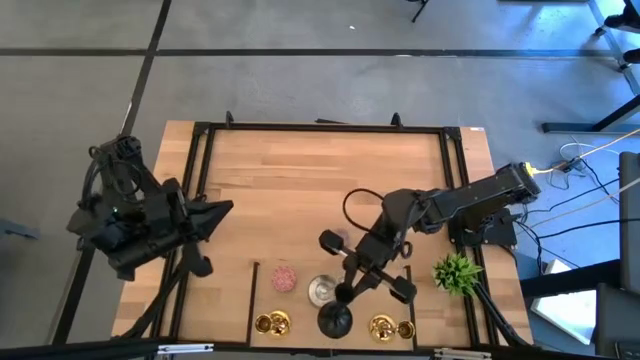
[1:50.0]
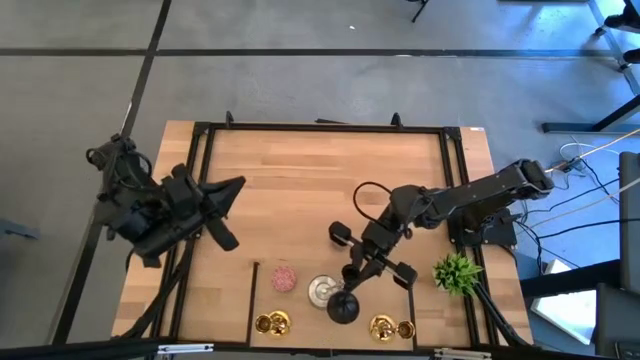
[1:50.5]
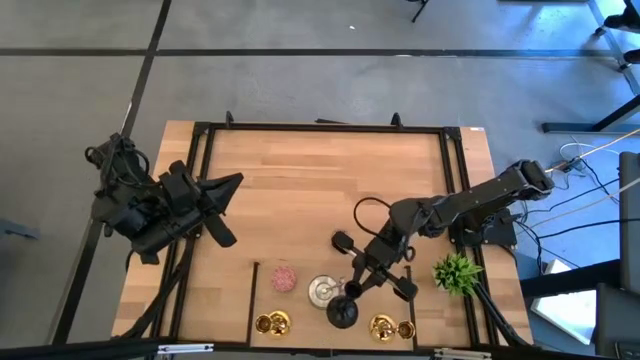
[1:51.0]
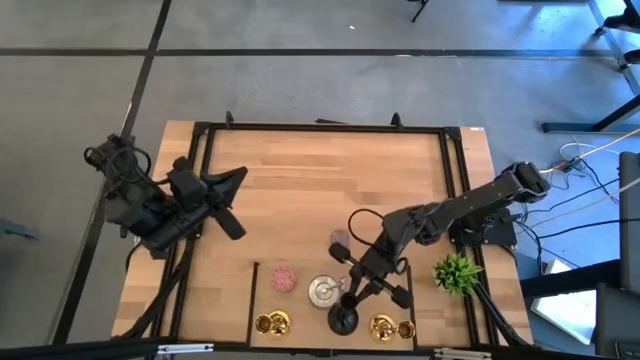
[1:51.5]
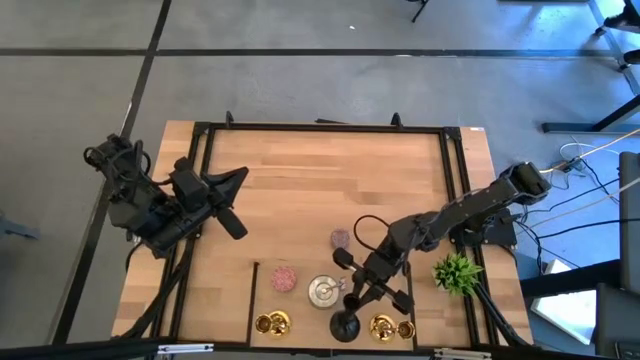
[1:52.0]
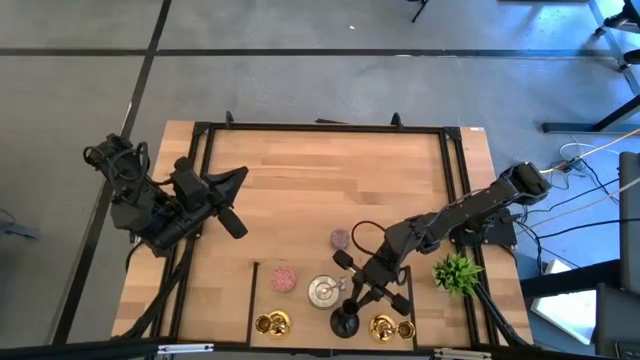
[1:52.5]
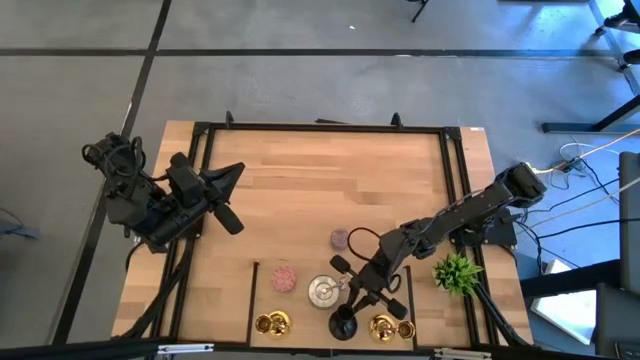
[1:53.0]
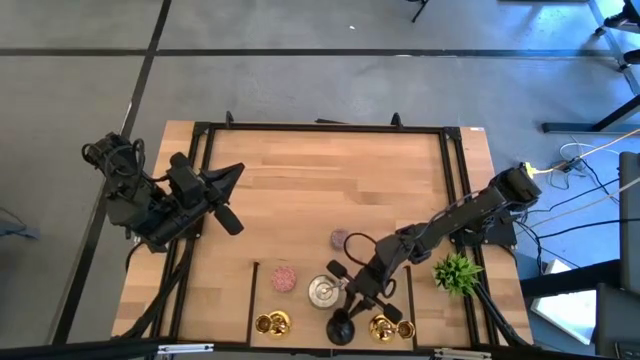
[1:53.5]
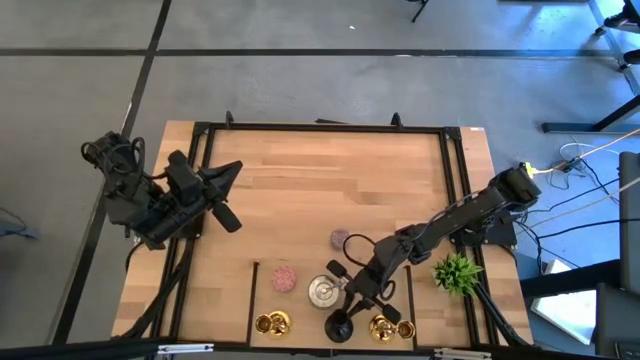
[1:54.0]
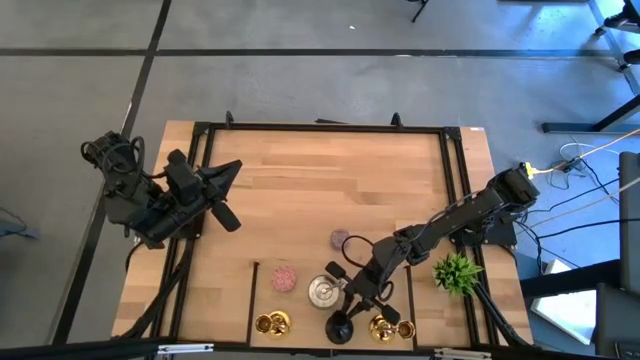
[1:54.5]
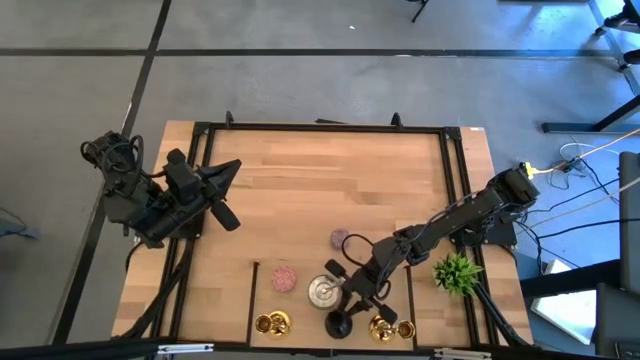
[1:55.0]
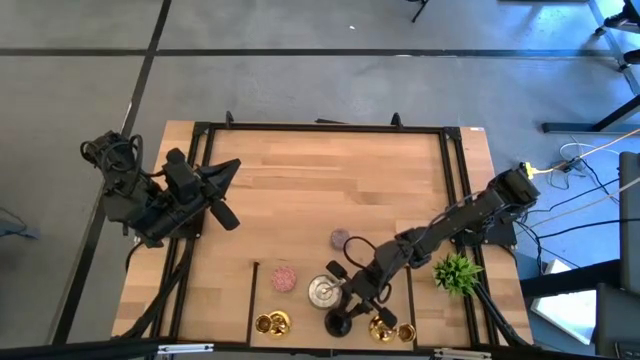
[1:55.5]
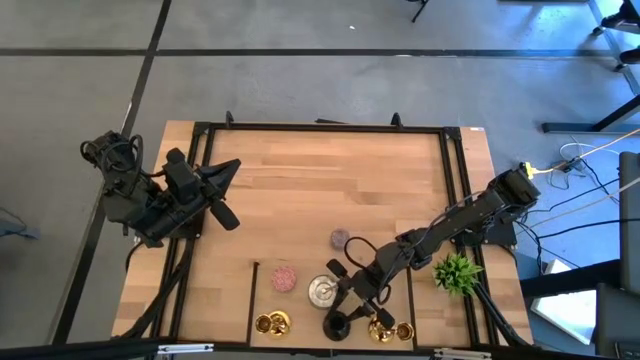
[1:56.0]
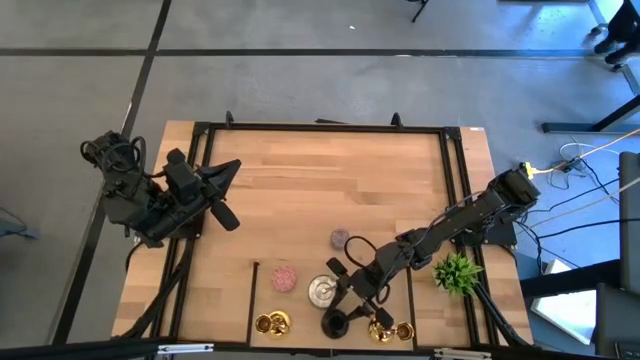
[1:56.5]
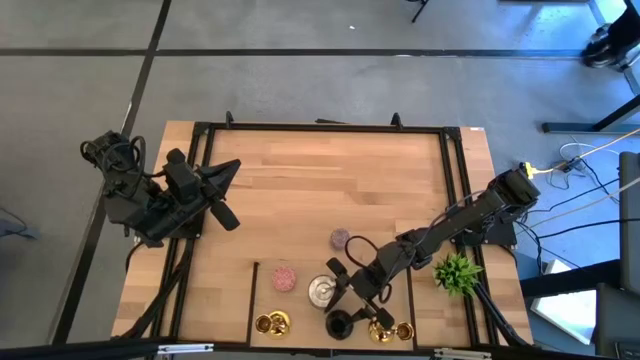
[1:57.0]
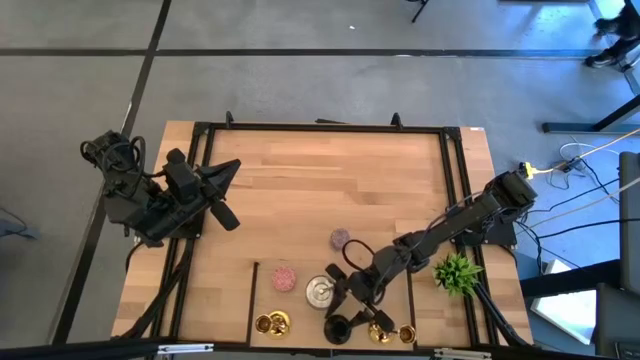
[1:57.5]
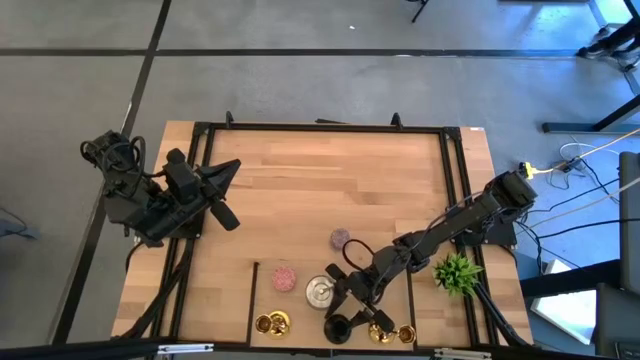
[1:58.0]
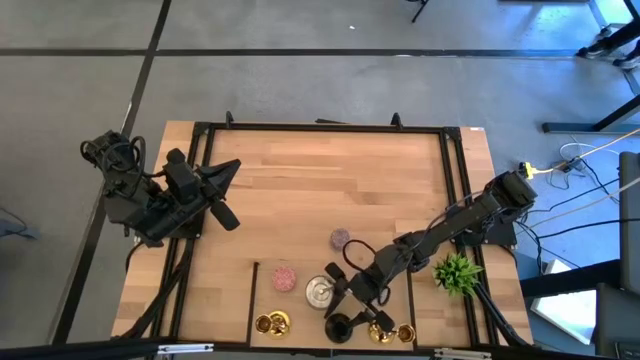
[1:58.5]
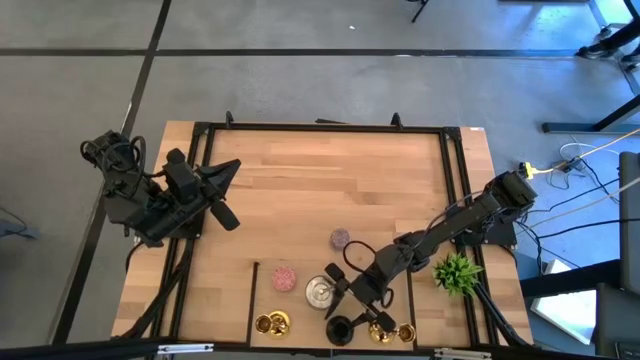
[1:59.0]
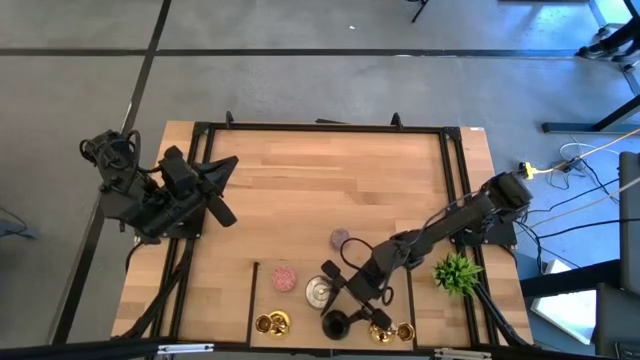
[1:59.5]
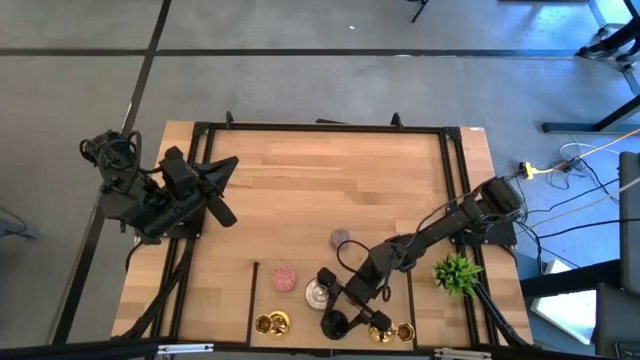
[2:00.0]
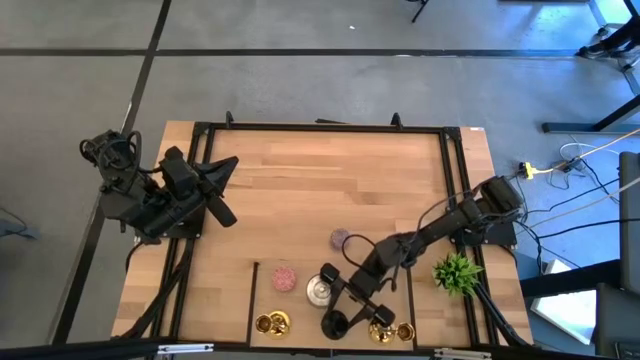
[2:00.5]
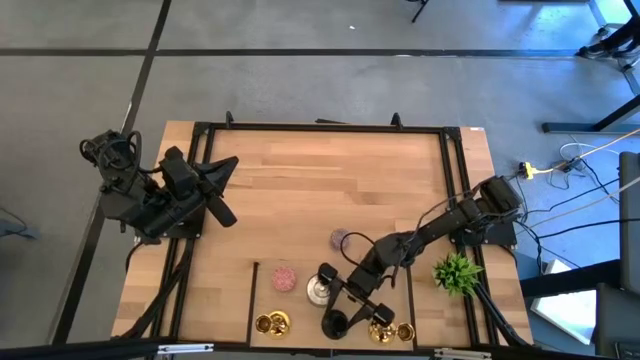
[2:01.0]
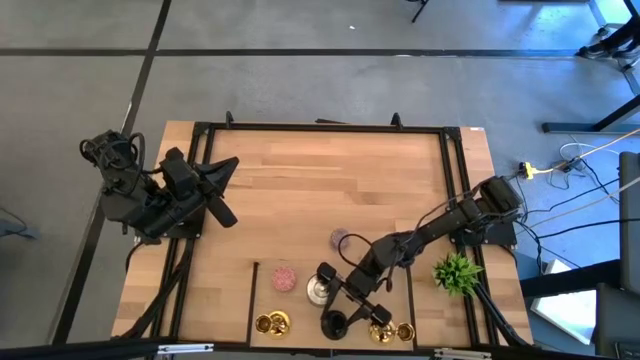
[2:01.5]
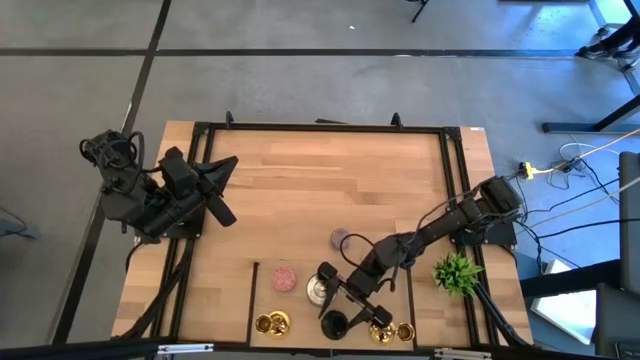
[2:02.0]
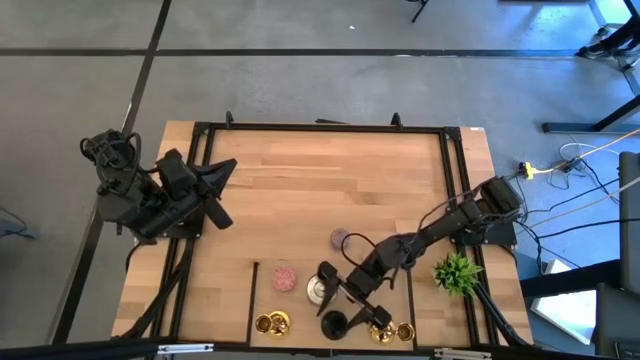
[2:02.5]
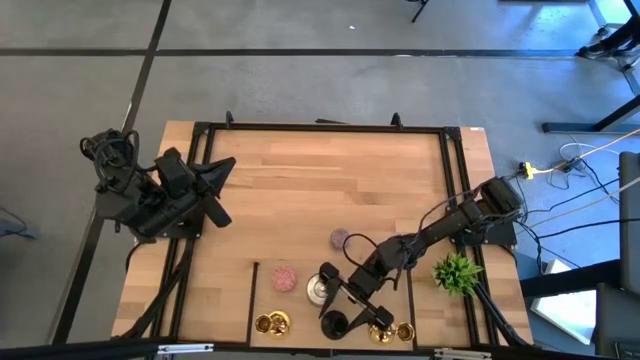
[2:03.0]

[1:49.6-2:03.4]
Task: Pick & Place candle stick holders
Put the black candle holder on the shelf

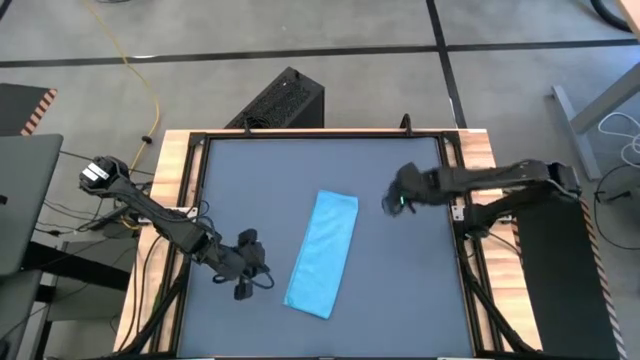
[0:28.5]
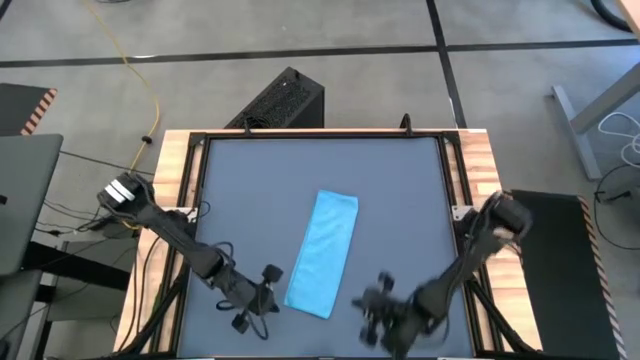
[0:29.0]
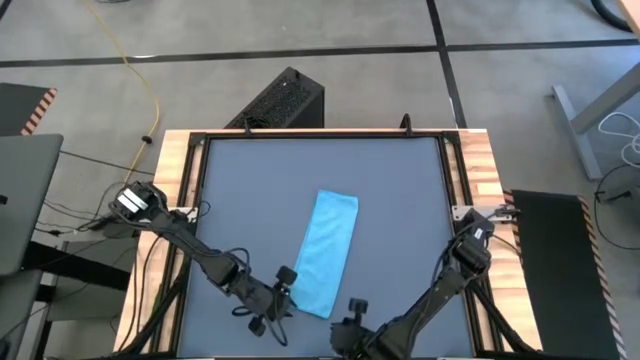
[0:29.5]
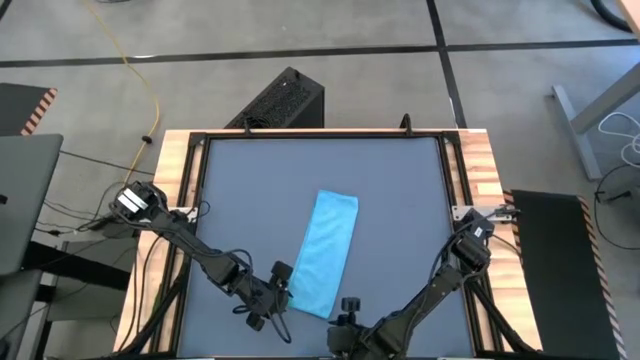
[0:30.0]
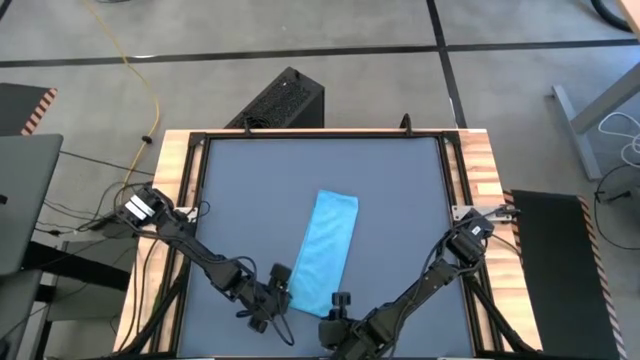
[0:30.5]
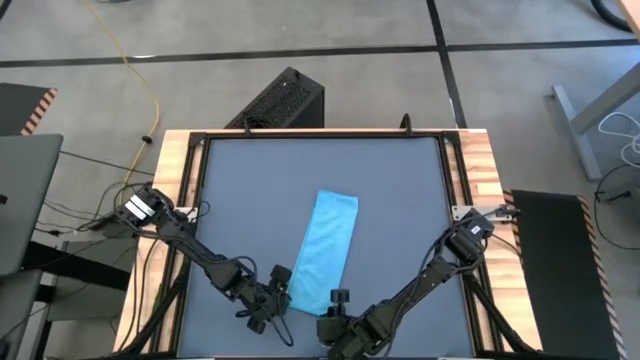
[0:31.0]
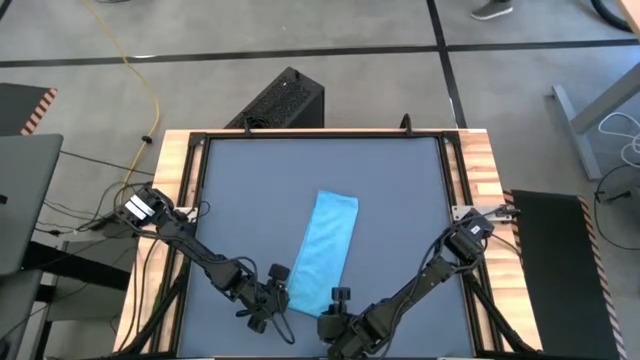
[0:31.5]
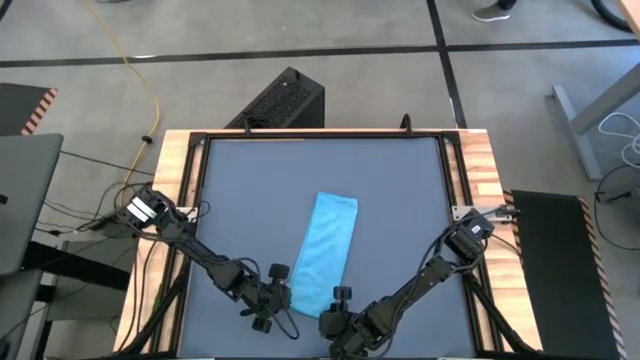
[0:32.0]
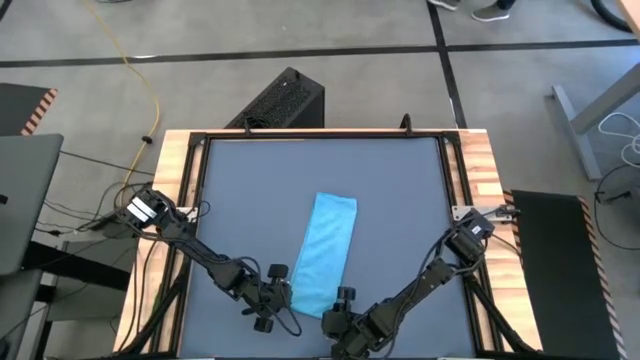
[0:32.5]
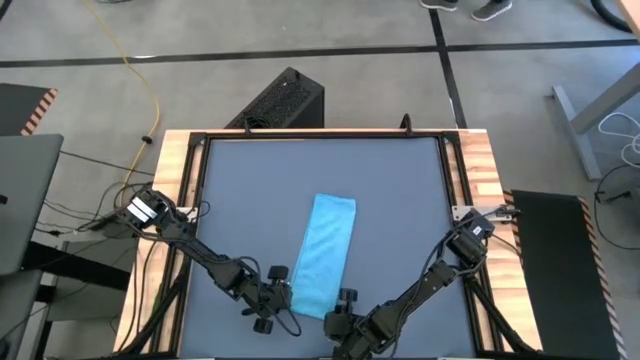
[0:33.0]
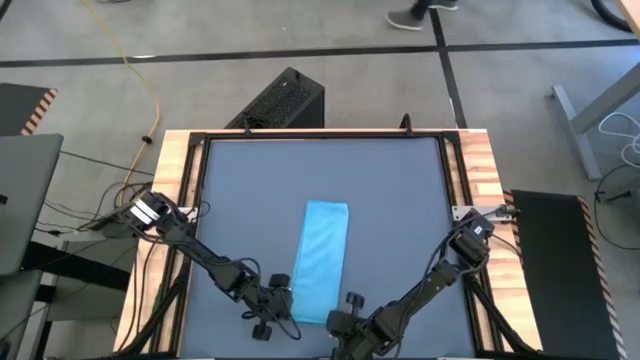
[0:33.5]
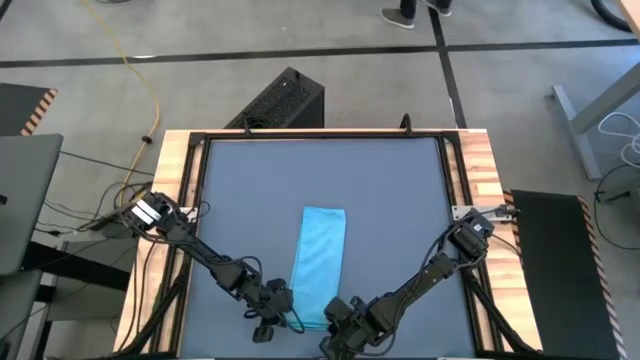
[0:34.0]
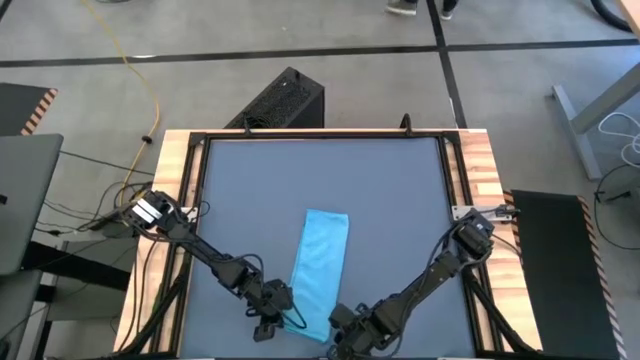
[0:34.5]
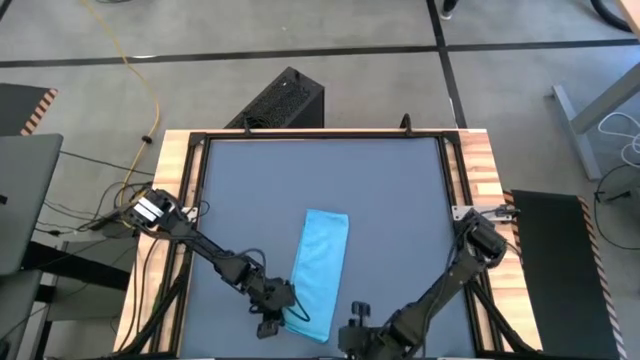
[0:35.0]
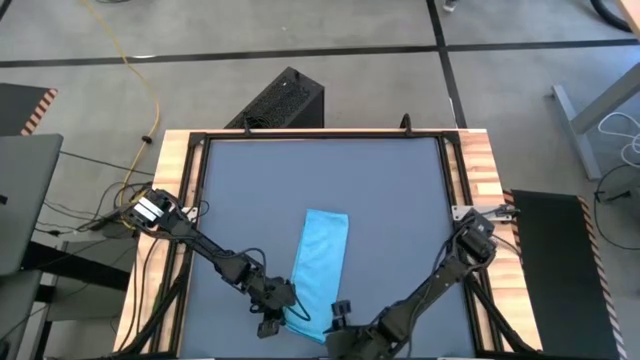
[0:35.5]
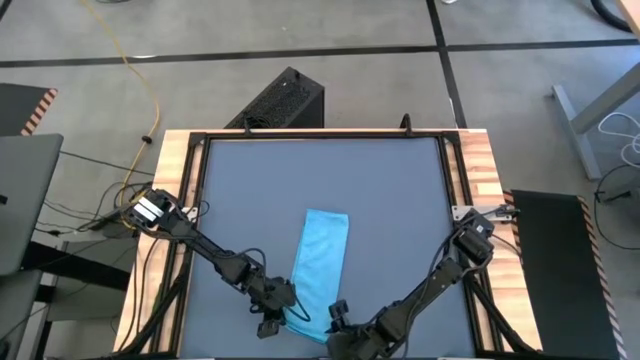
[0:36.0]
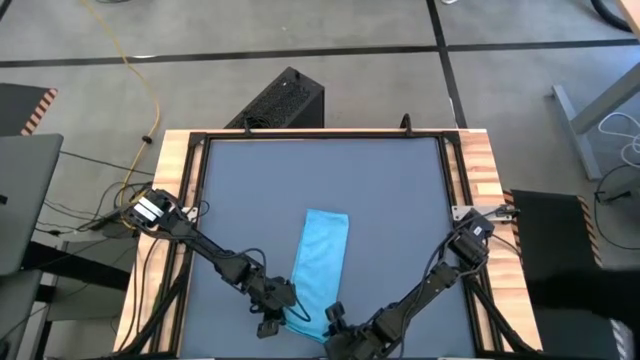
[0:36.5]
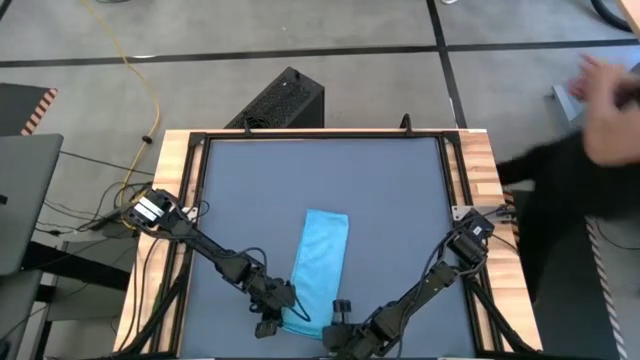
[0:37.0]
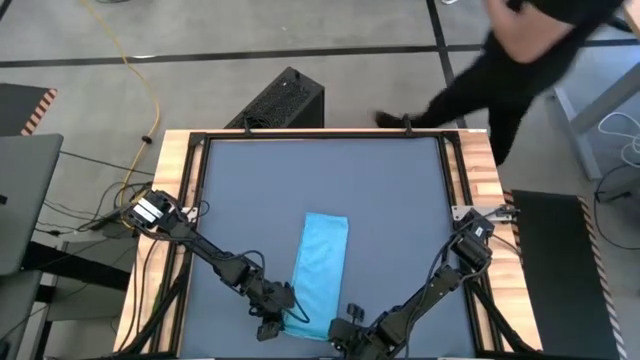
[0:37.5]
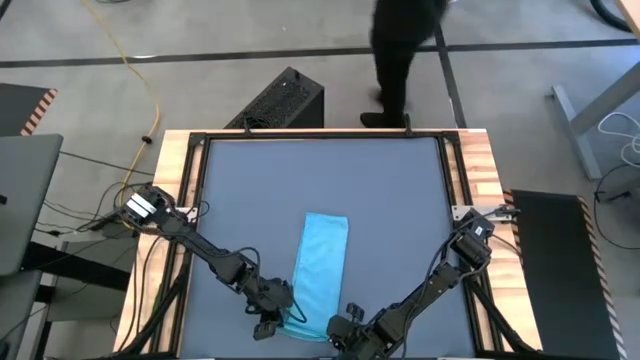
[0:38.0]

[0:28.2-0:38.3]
Task: Roll towel
Roll the blue towel
